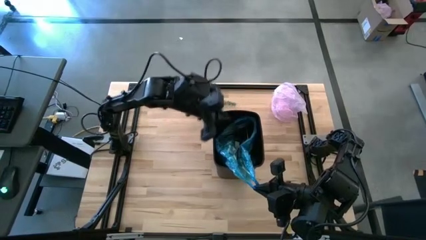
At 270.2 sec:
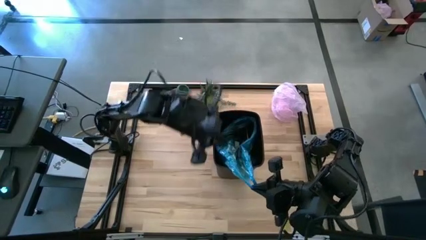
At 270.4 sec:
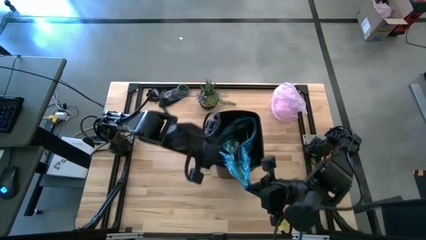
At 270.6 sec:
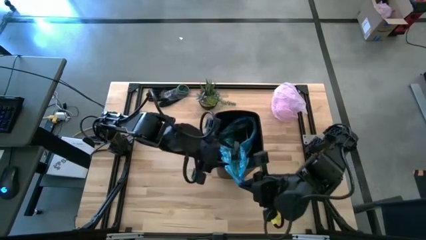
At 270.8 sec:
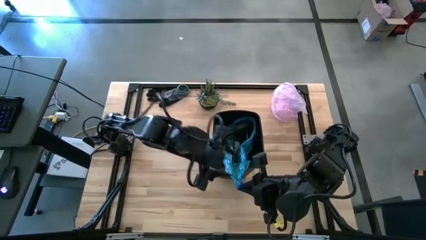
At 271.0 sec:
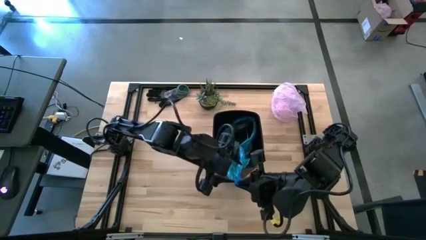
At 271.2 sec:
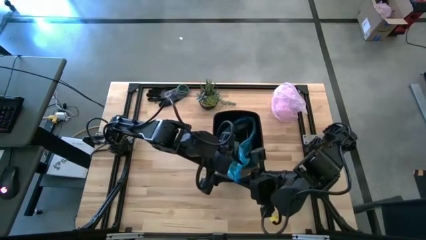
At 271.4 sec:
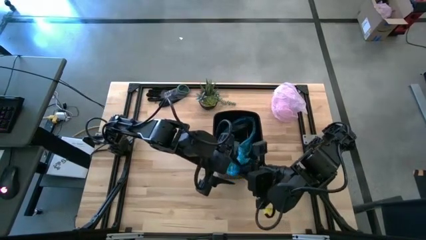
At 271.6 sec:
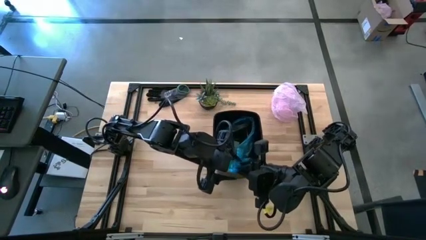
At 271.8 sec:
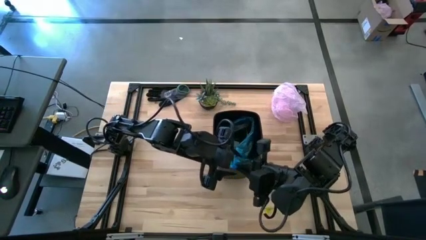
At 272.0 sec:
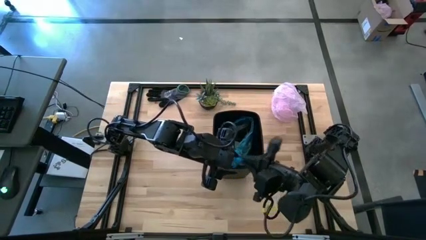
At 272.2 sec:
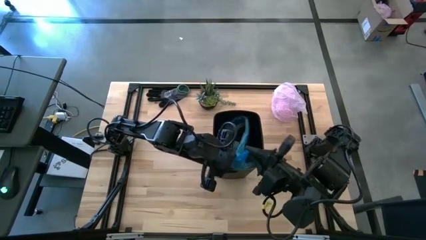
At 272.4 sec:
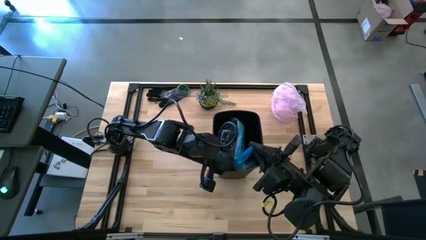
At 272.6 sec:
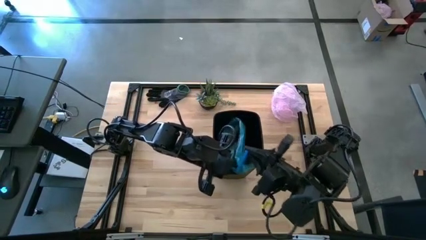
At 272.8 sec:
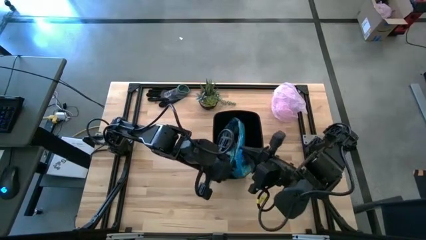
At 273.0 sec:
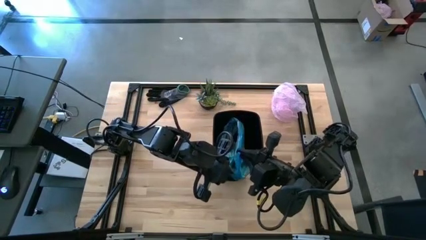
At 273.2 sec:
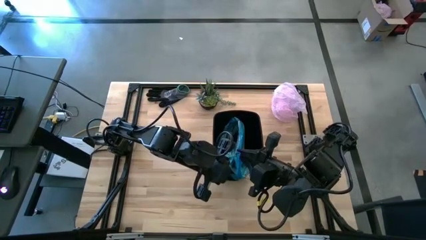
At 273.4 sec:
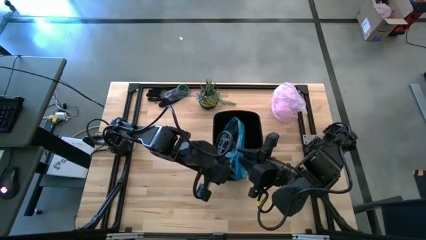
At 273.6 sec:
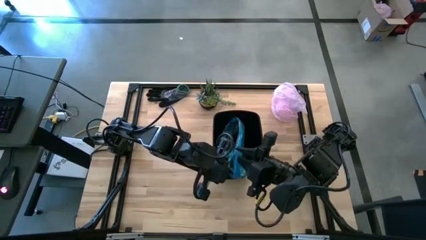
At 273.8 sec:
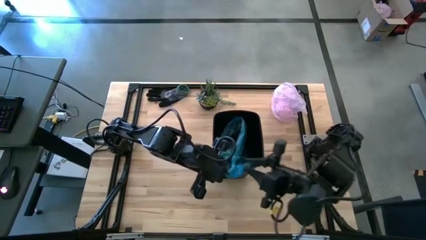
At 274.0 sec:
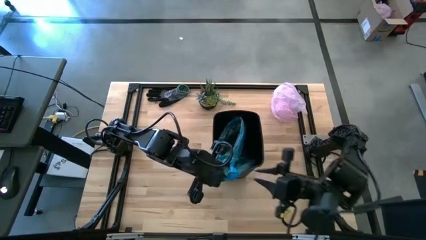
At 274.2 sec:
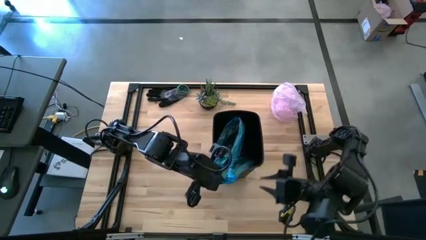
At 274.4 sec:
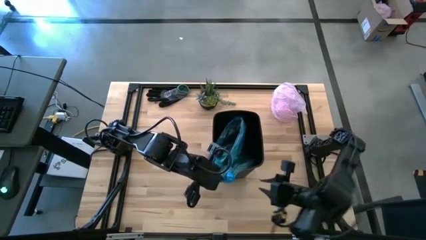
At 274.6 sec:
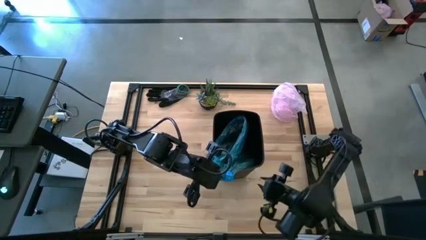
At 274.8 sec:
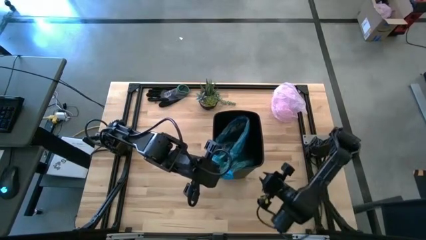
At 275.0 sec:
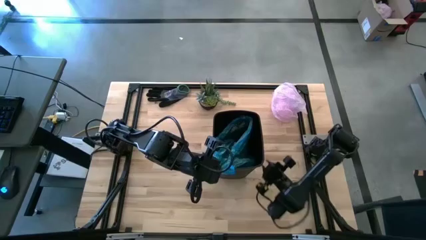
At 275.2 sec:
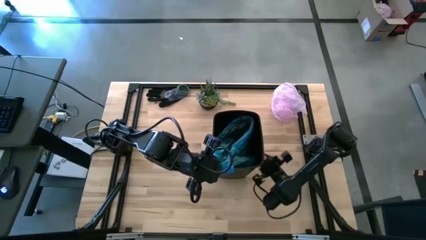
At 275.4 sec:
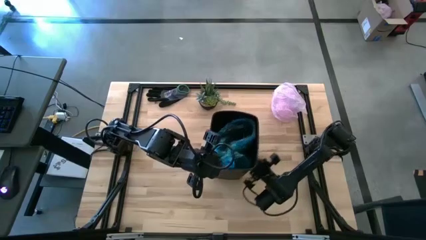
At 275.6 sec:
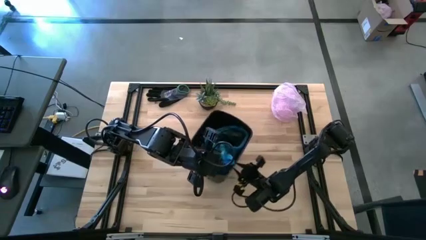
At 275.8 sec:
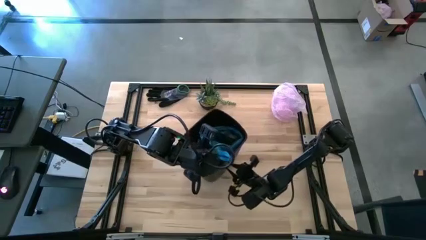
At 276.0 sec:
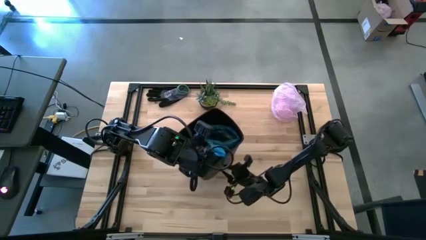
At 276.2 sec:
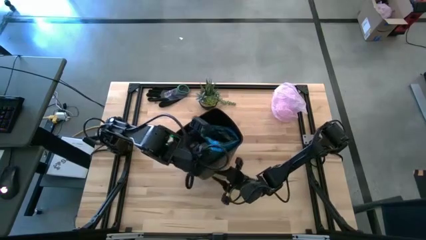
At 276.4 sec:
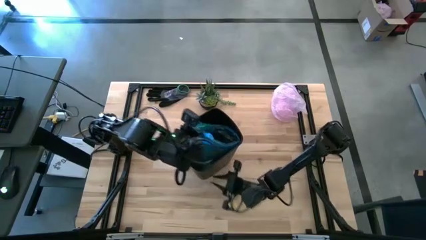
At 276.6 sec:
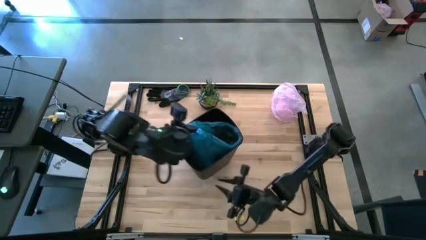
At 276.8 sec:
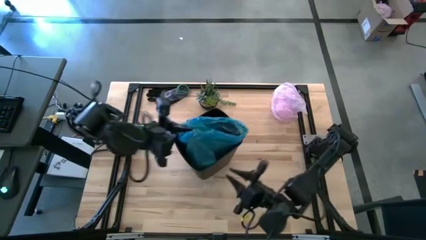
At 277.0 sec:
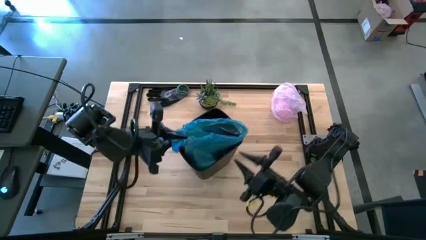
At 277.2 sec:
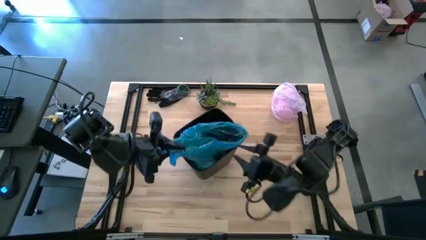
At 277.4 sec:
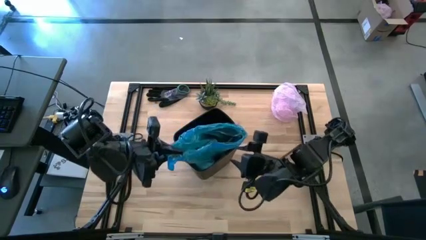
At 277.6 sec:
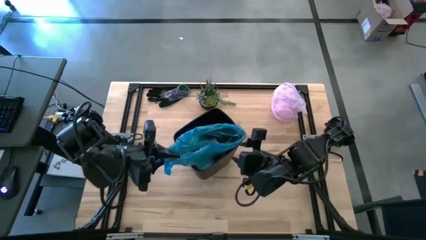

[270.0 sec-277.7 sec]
Task: place trash/remove bag and relplace
Remove the blue trash bag from the trash bin

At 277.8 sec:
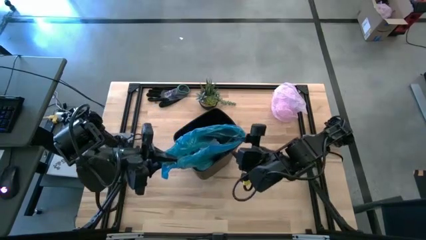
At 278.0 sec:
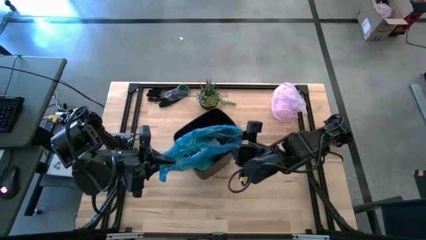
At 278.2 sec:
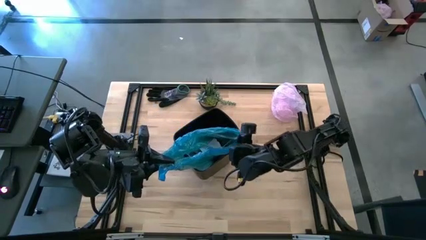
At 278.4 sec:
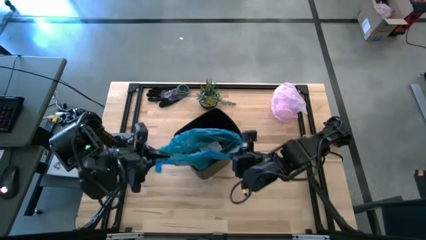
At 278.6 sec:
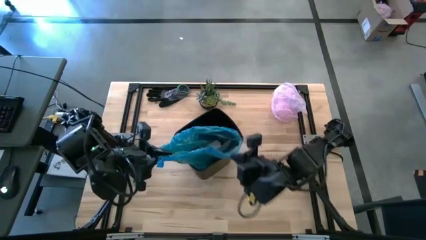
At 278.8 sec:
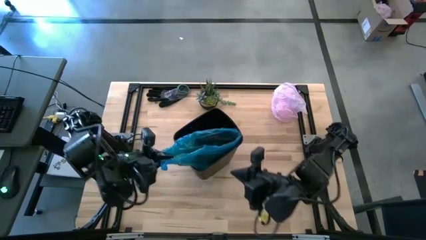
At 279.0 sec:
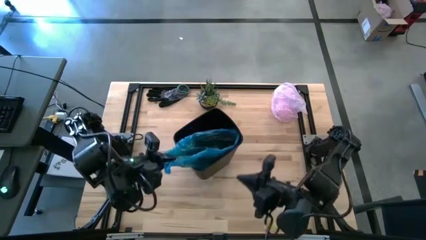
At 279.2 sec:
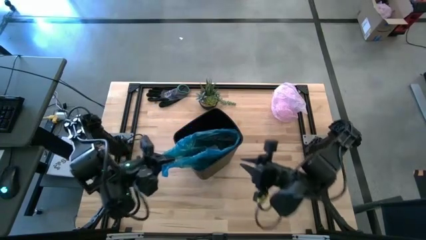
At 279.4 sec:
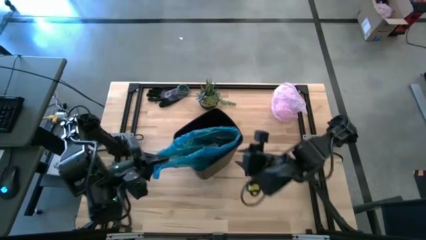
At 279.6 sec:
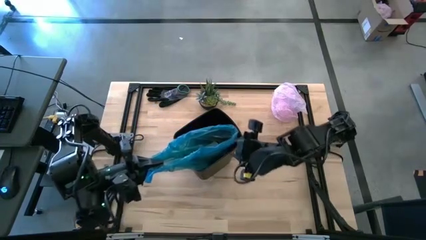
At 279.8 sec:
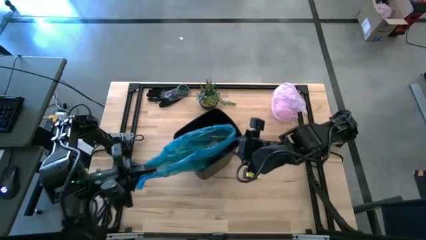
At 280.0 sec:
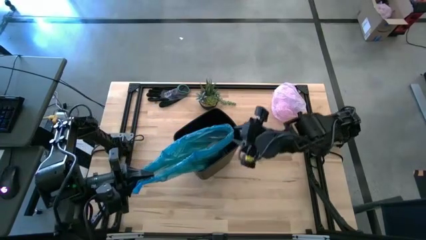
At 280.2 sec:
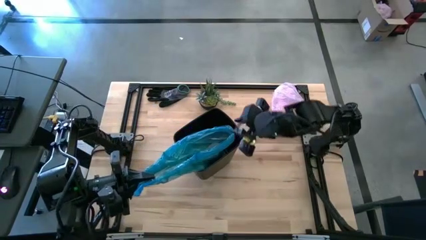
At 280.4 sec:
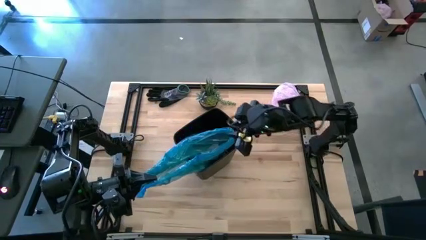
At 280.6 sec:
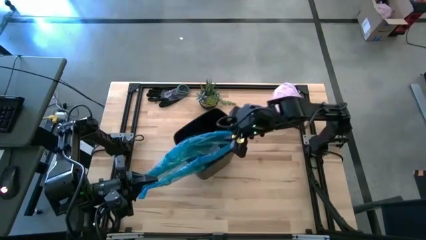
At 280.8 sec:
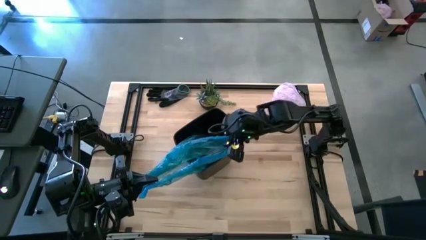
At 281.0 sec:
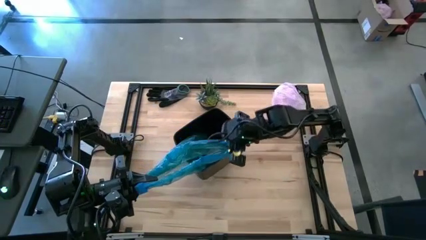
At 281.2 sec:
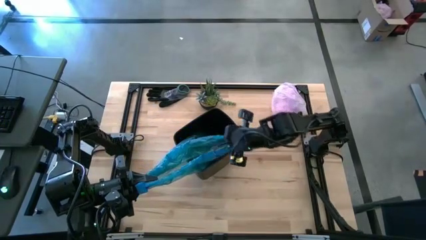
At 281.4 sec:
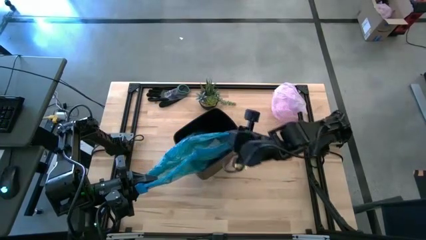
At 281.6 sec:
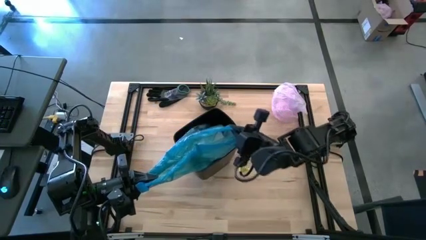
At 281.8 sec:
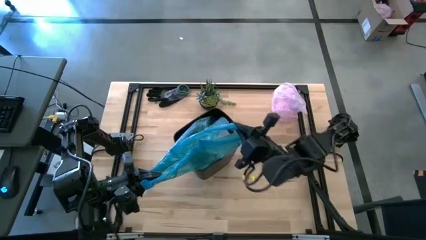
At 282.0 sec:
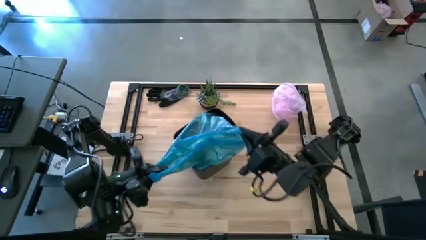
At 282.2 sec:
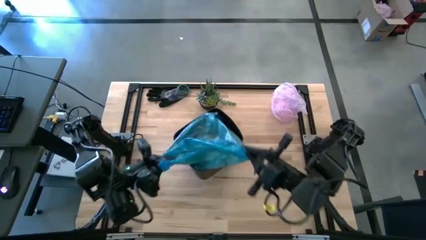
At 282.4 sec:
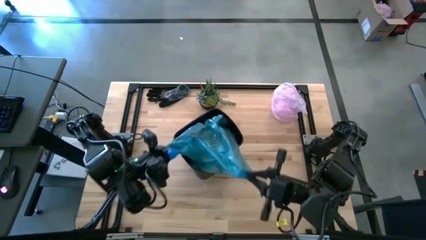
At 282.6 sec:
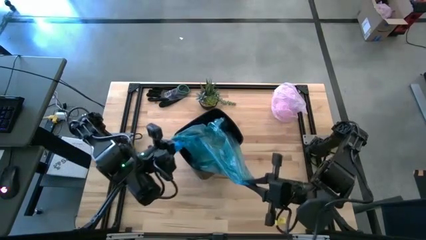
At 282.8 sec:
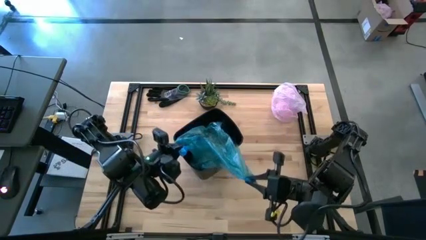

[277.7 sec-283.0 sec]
Remove the blue trash bag from the trash bin
